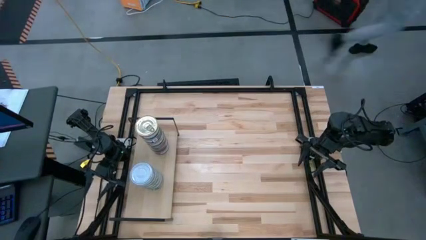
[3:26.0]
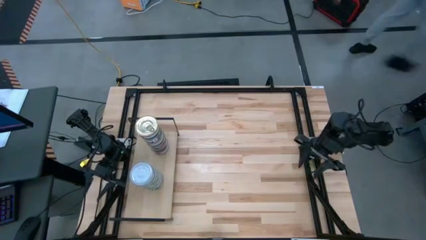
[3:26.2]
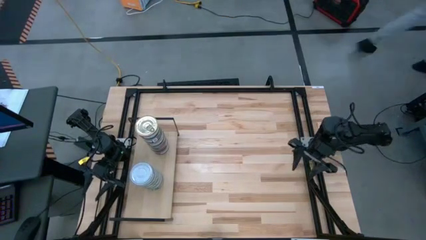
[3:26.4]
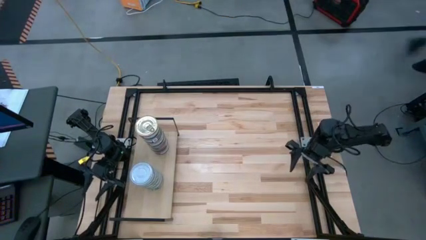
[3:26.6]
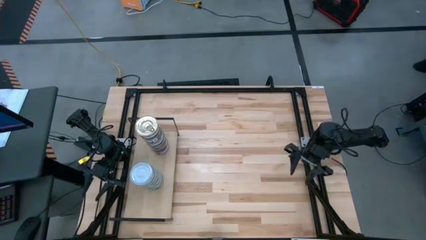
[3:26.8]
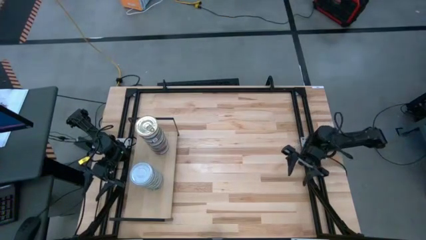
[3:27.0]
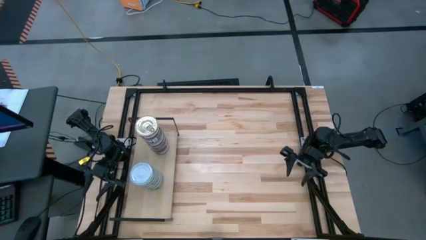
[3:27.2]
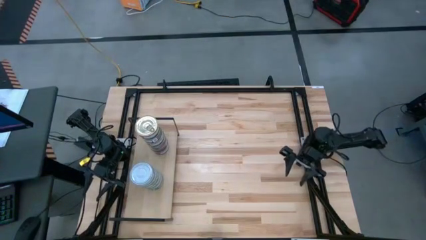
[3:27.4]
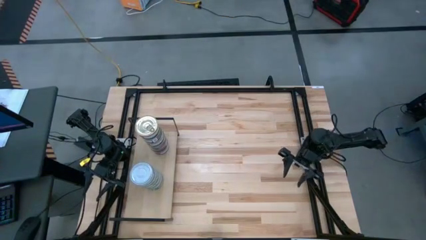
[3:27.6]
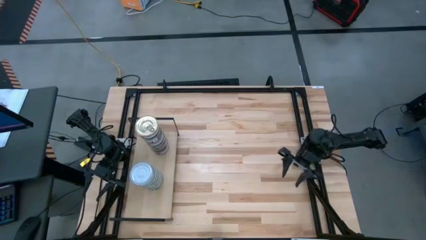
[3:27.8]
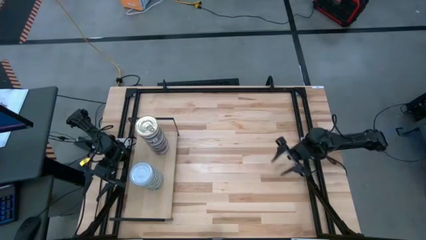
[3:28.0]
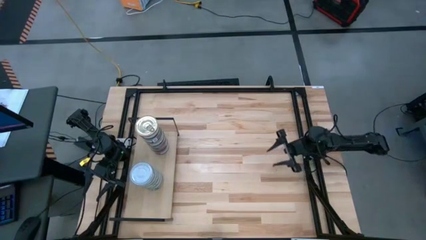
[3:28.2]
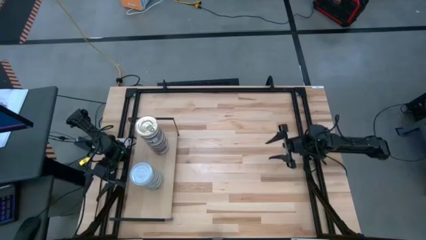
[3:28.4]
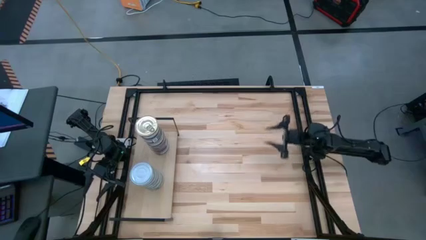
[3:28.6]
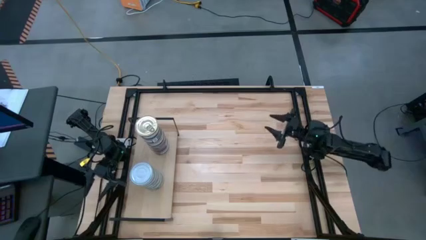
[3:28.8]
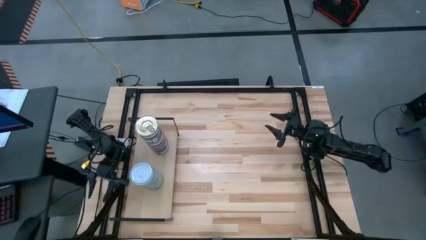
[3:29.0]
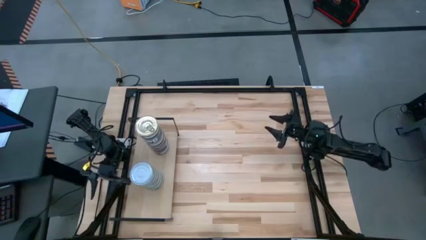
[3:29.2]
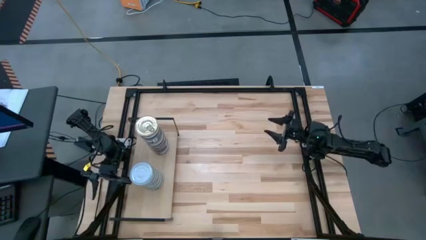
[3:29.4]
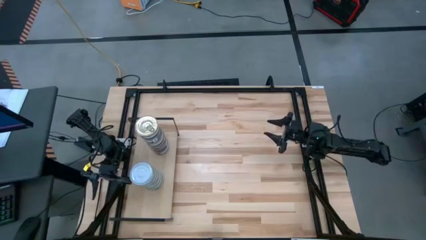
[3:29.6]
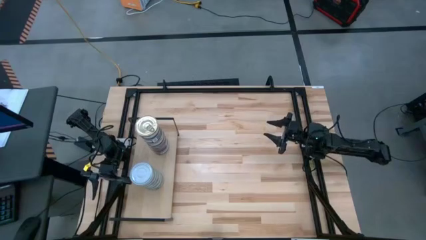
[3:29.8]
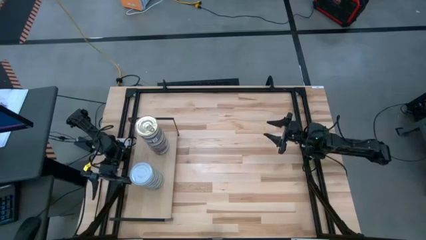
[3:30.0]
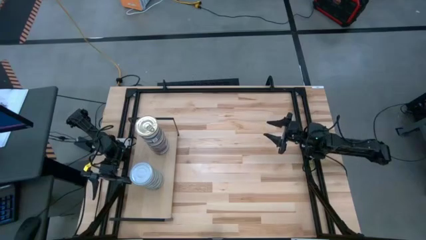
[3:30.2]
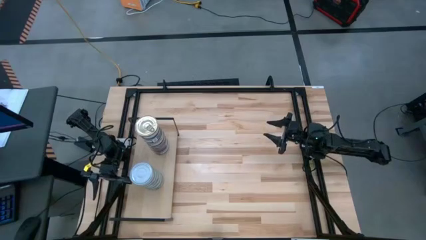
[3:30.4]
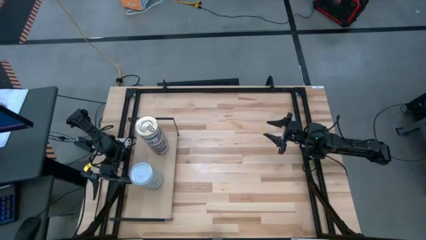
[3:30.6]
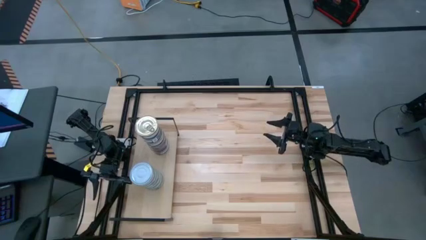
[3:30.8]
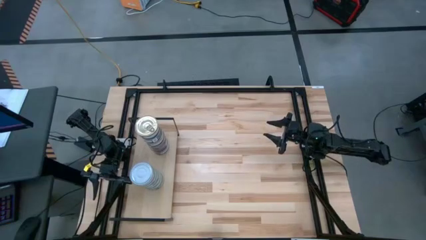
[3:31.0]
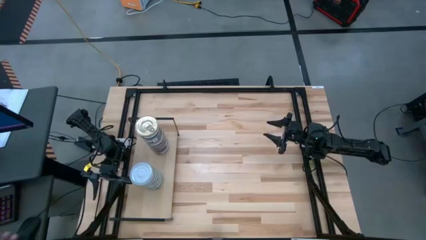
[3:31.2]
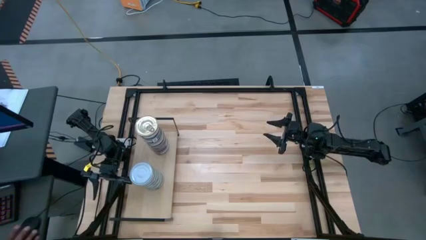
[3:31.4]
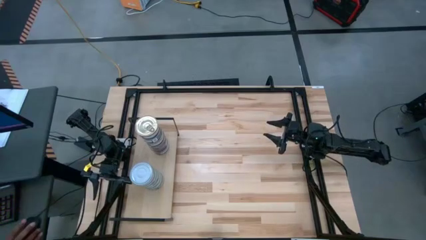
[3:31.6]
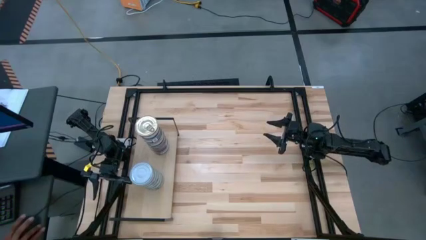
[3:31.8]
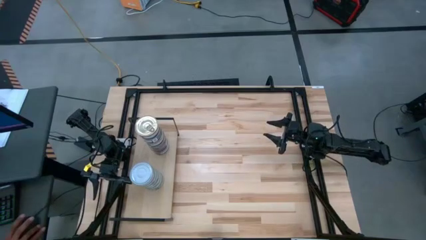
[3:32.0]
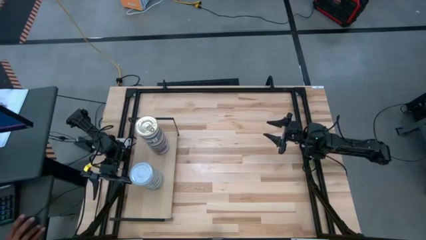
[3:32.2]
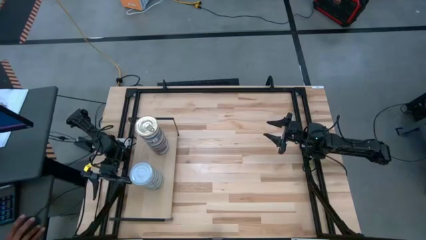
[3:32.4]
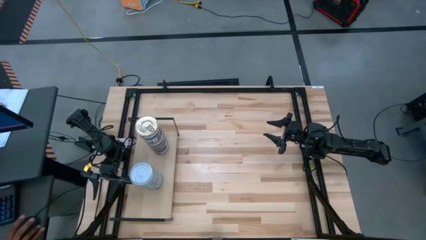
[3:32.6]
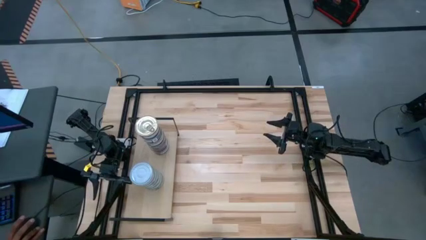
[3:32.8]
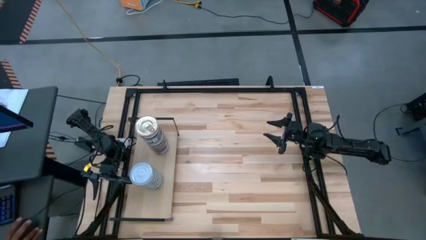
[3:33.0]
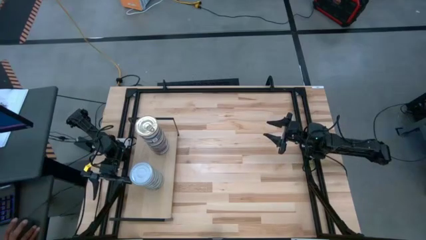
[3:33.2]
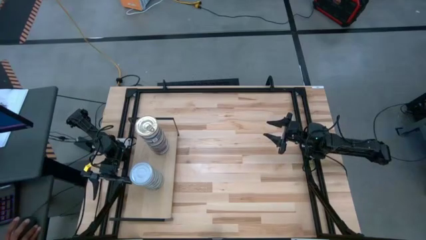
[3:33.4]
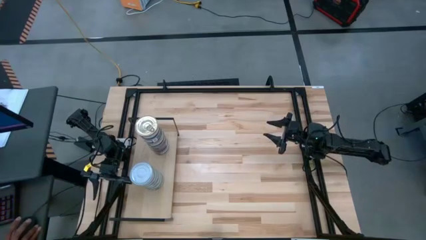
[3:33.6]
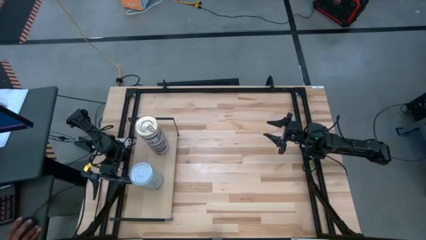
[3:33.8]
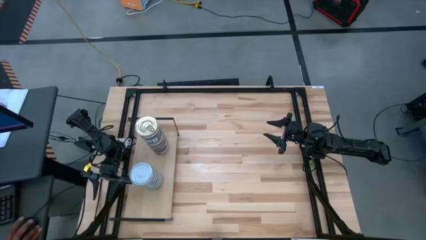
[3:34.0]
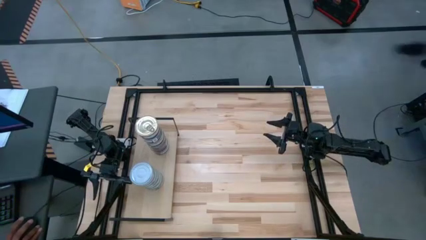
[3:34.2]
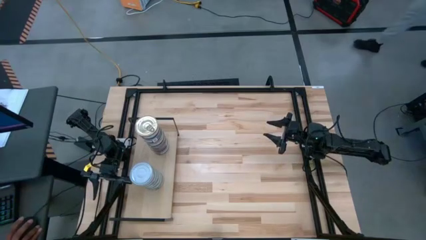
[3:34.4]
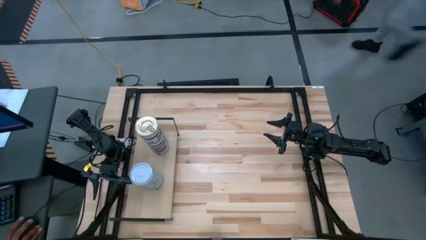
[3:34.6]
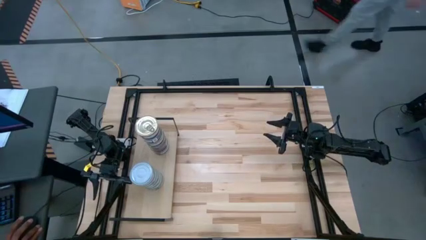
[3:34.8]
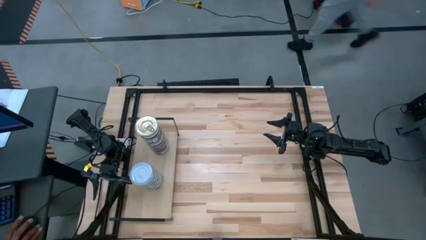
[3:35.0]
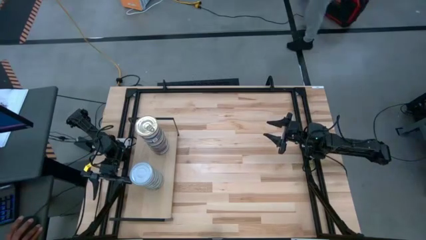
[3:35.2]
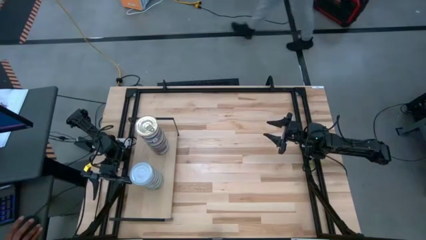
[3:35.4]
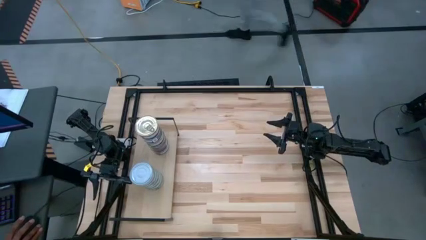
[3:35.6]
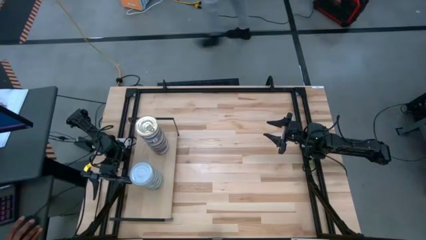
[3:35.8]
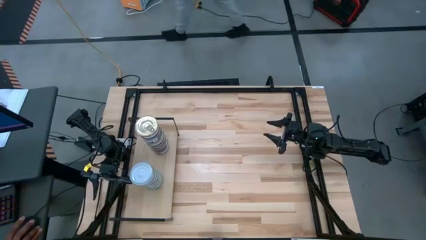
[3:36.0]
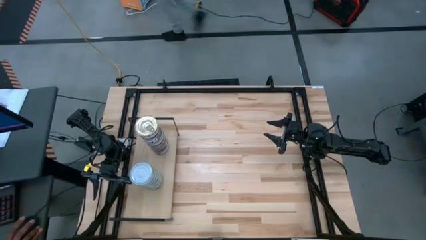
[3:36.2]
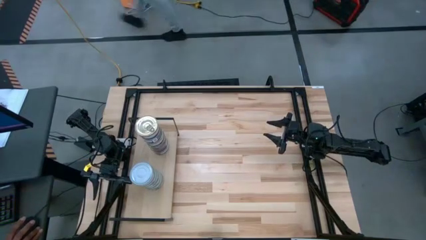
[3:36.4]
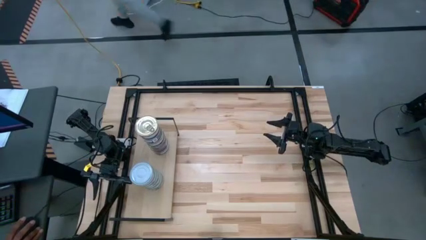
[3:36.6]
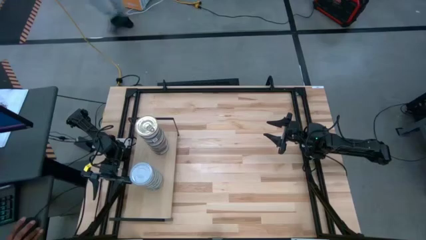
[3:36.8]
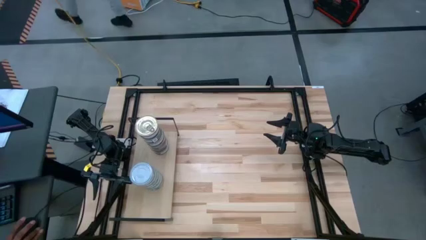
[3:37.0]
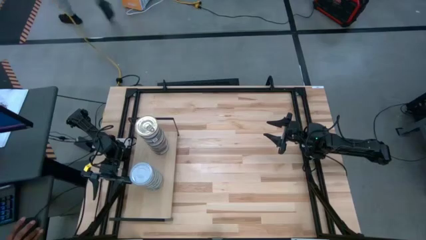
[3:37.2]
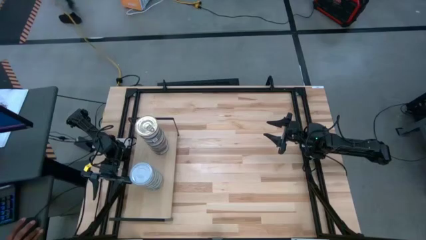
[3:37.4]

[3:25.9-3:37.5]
Task: Stack canned seafood by type on shelf
Return to home position
